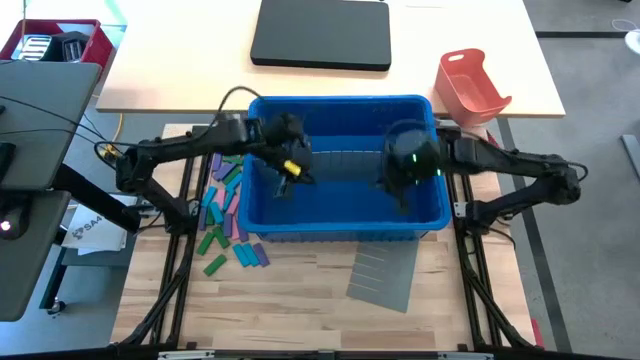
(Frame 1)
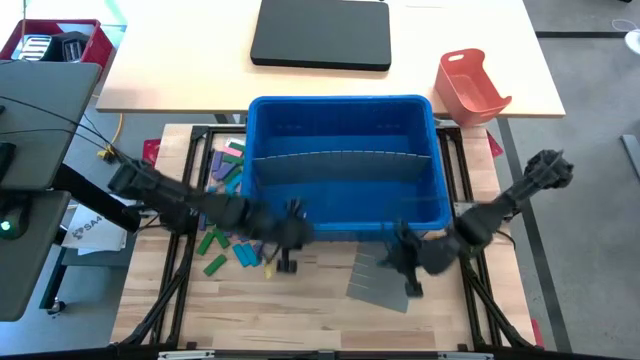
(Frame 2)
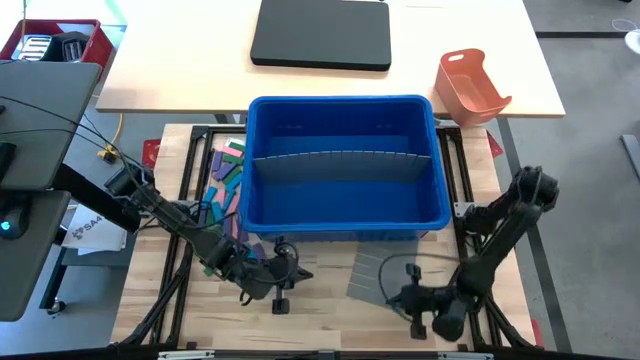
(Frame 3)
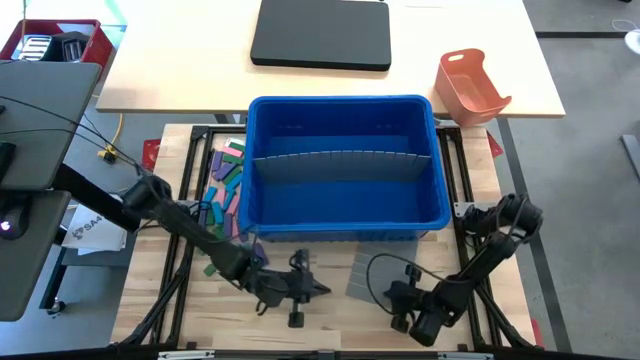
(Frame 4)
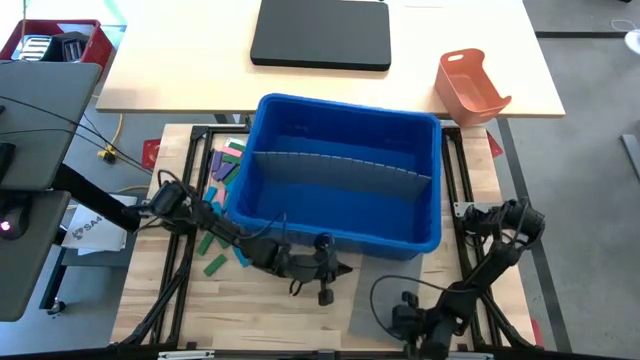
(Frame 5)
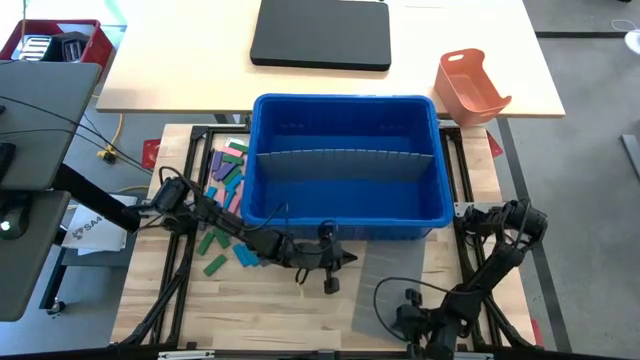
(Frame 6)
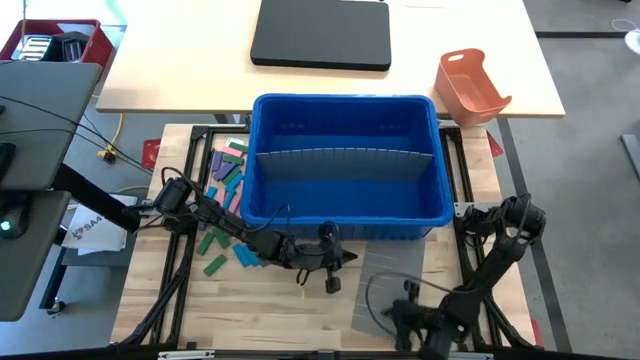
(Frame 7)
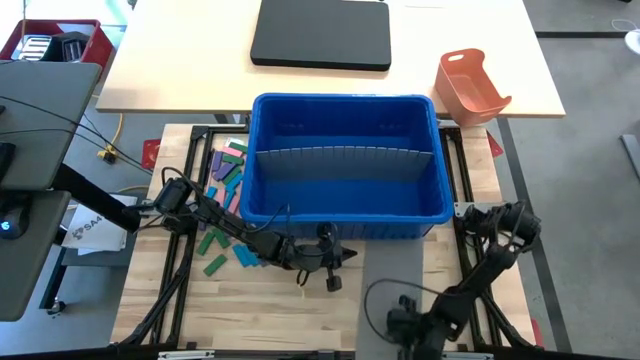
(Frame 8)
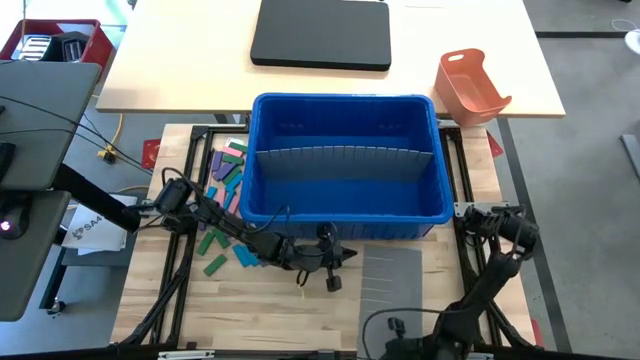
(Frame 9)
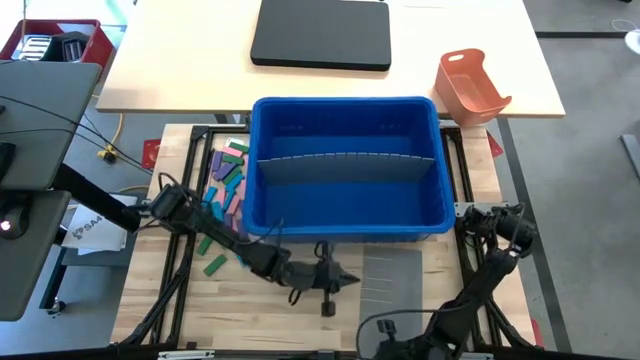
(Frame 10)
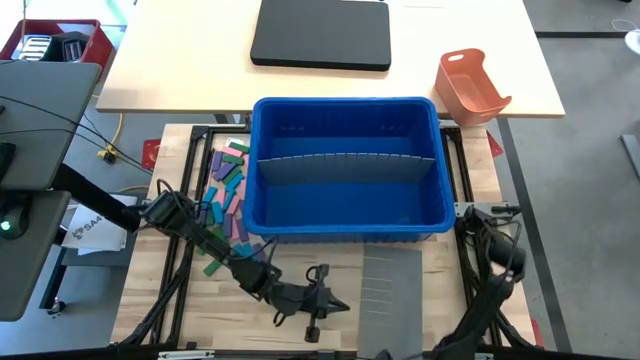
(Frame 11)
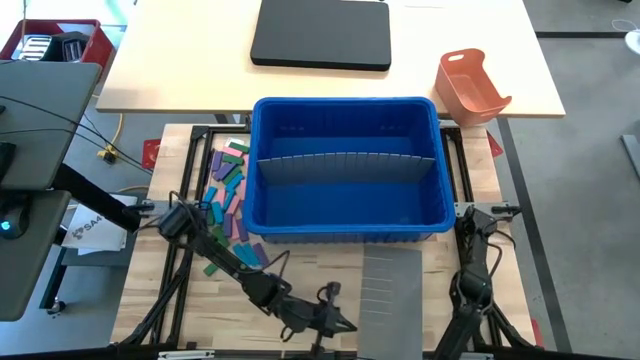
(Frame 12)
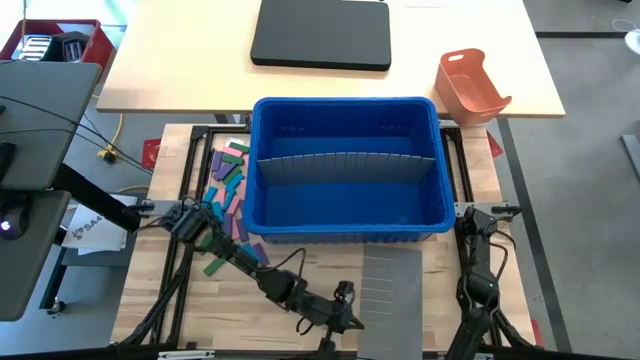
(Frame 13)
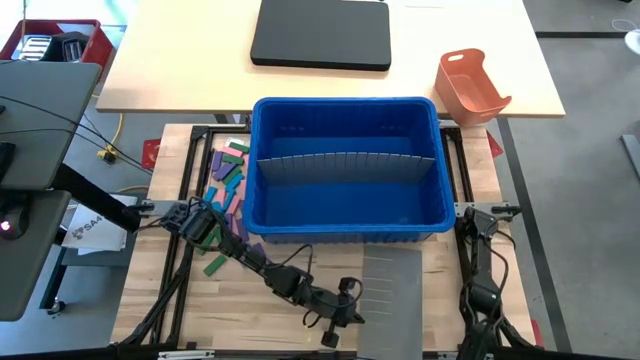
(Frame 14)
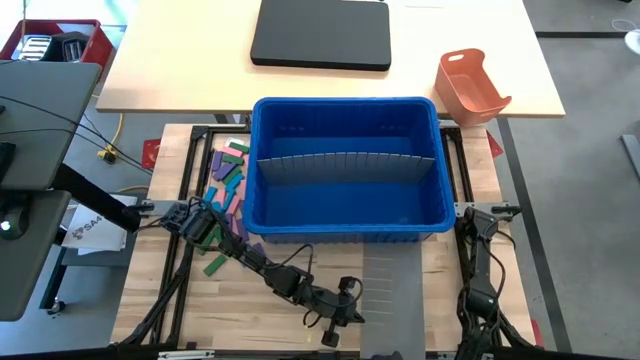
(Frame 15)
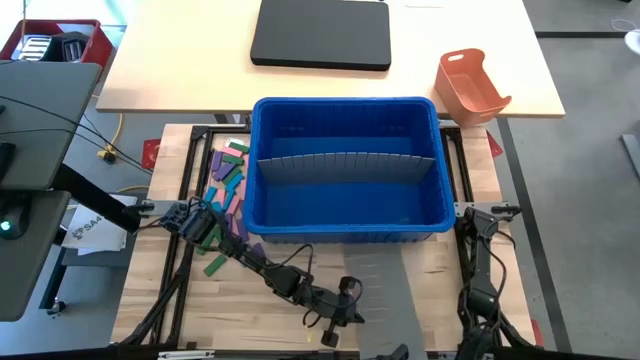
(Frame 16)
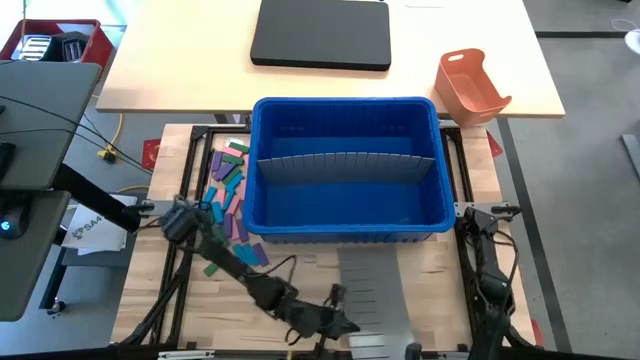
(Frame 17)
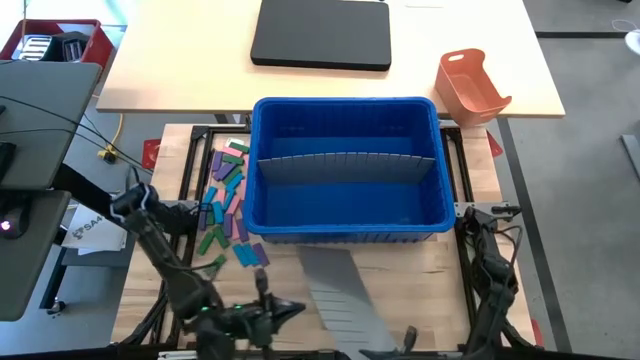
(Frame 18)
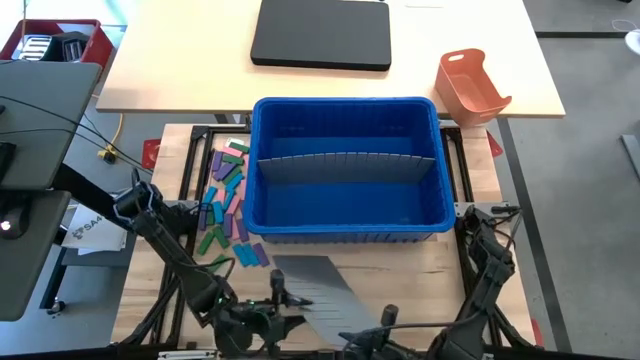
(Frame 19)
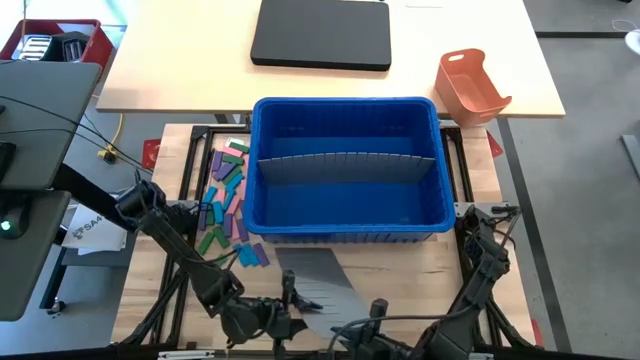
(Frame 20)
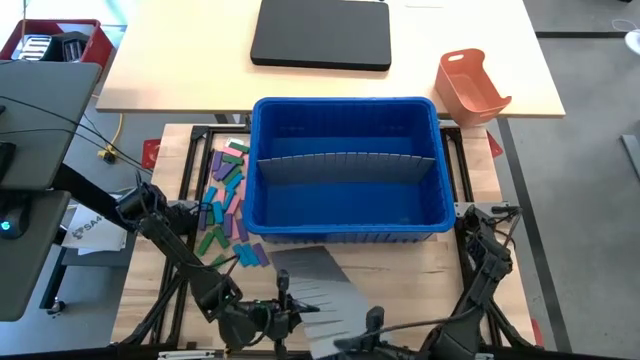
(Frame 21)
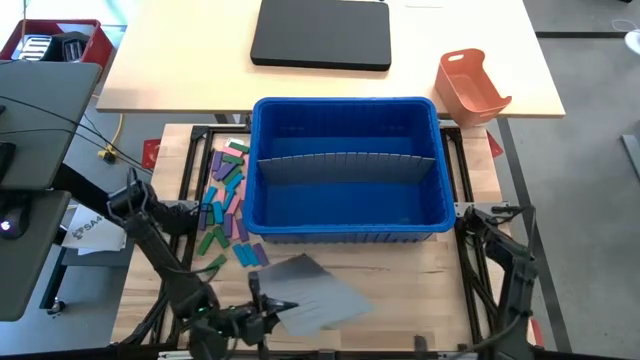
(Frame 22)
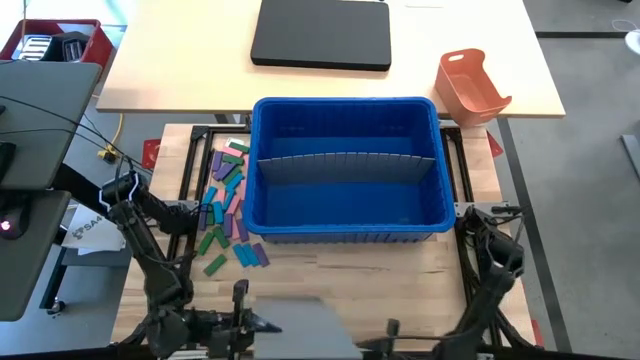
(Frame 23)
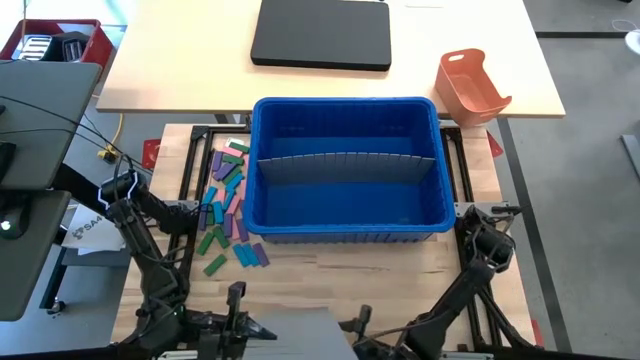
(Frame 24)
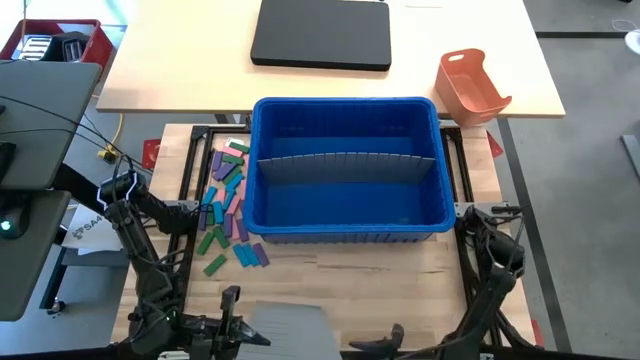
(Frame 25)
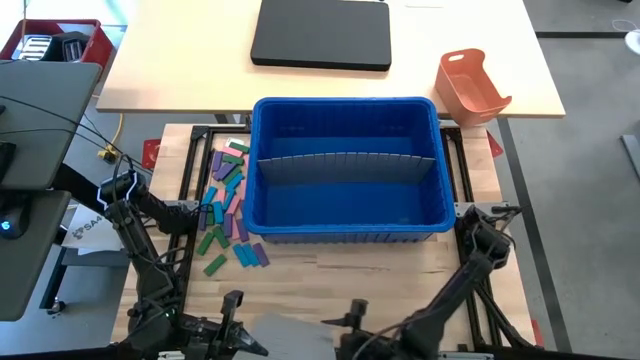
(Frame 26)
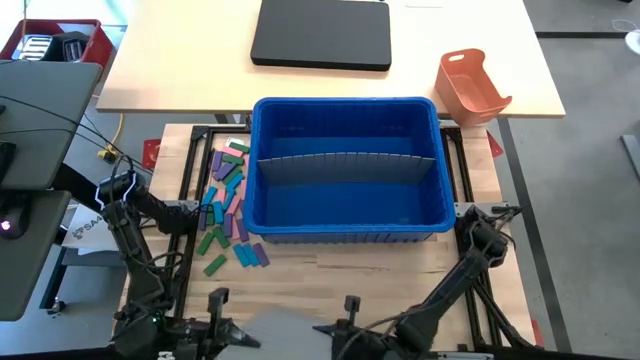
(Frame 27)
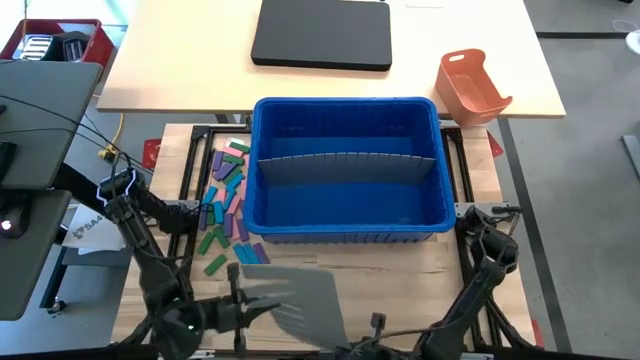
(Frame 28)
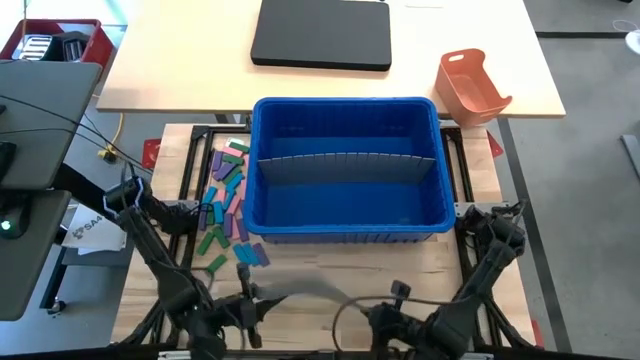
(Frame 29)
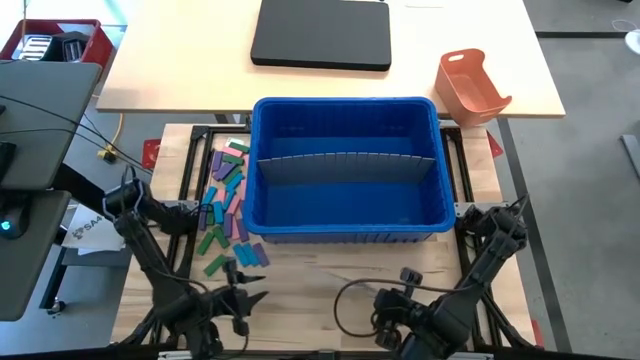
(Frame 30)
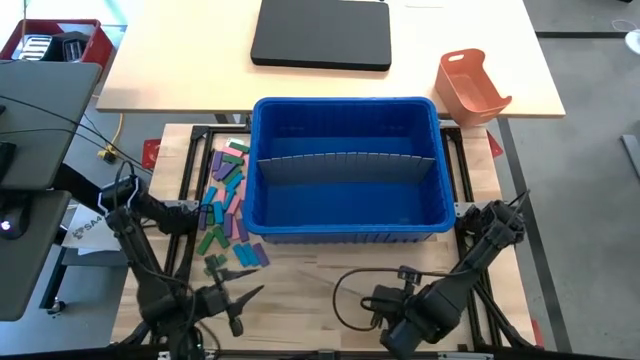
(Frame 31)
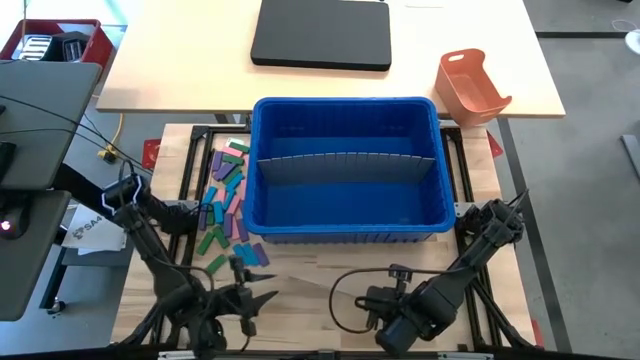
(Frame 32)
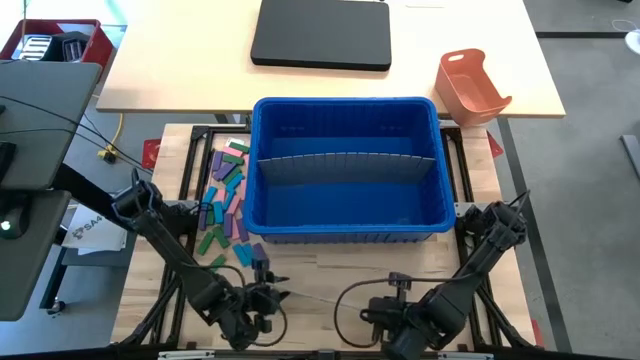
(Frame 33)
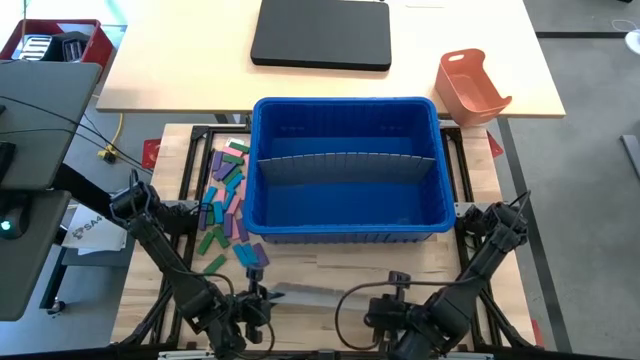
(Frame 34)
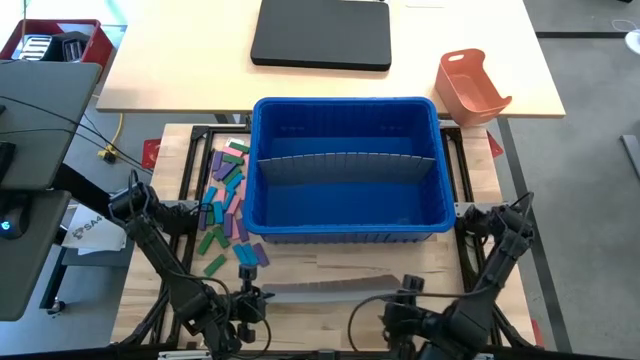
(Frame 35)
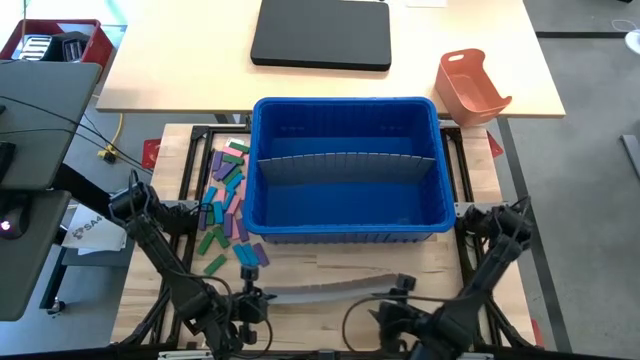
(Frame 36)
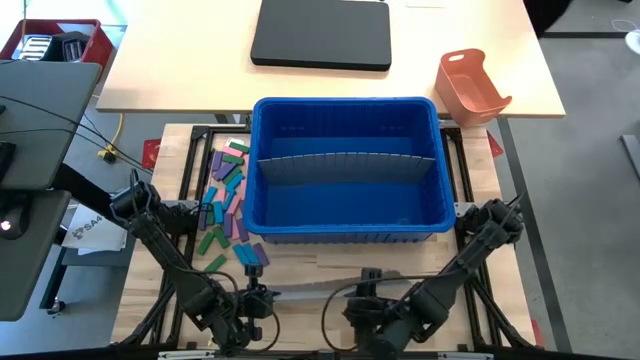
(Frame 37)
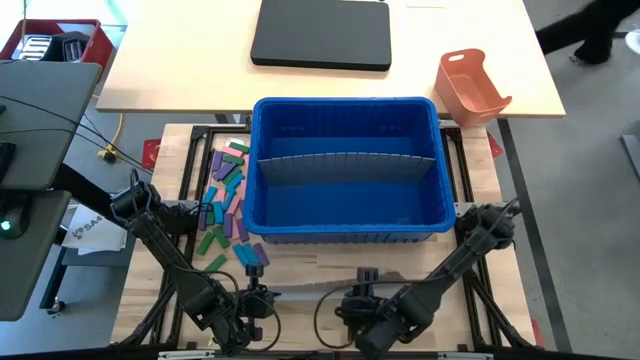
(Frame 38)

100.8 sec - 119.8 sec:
Task: Sort blocks
Insert the bin divider into the blue bin
